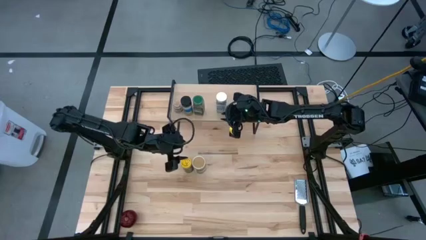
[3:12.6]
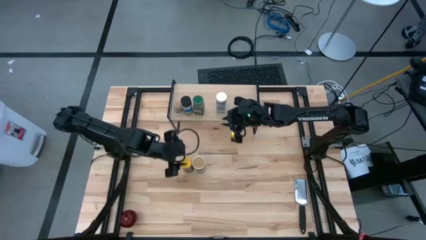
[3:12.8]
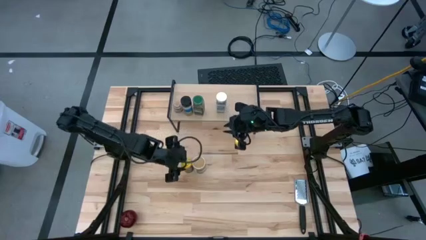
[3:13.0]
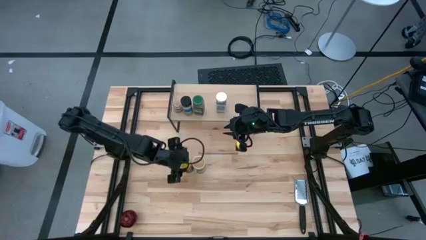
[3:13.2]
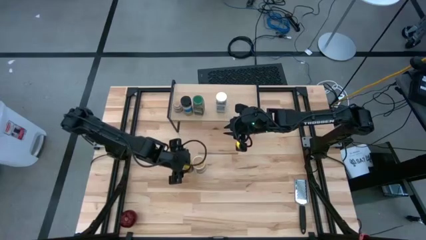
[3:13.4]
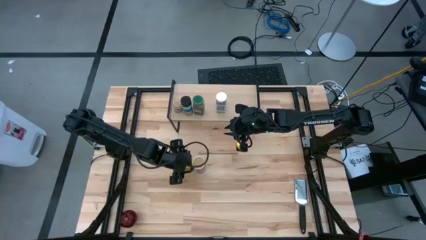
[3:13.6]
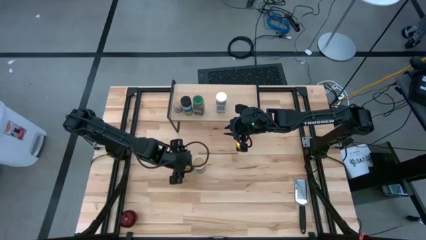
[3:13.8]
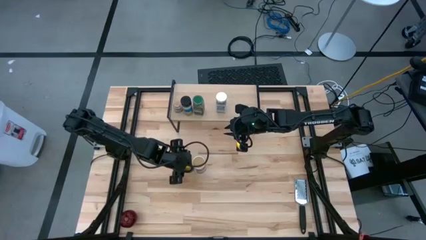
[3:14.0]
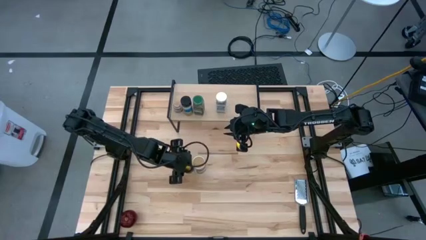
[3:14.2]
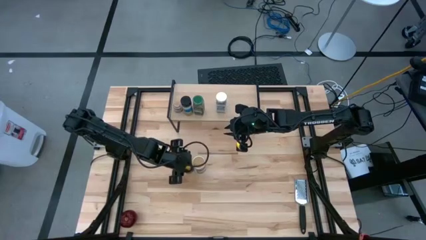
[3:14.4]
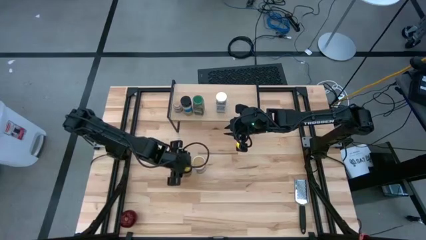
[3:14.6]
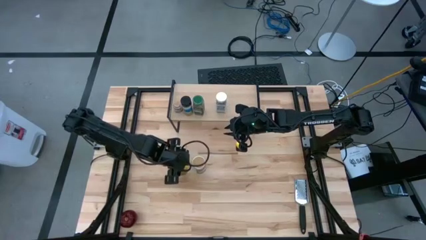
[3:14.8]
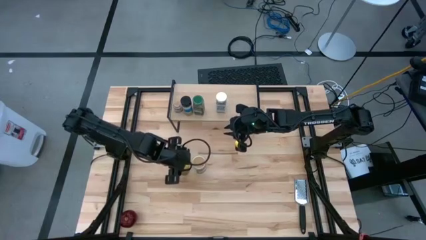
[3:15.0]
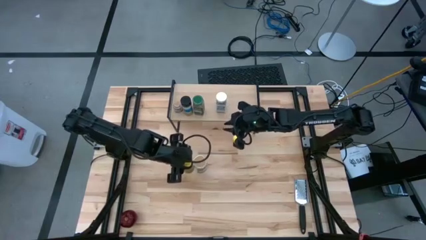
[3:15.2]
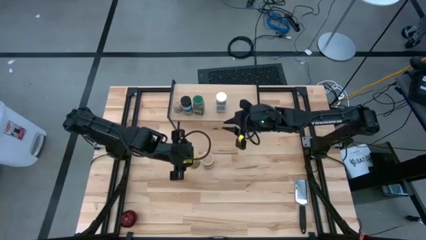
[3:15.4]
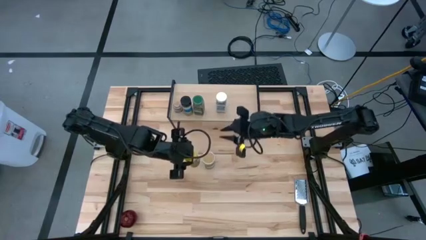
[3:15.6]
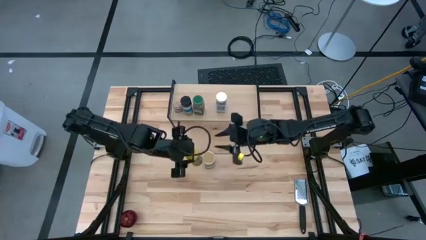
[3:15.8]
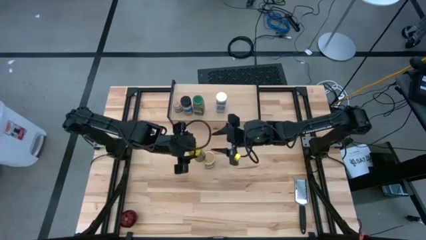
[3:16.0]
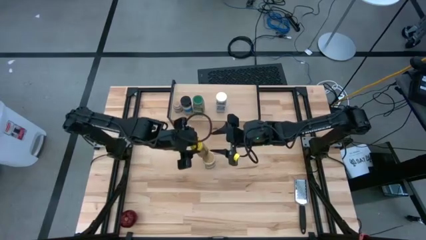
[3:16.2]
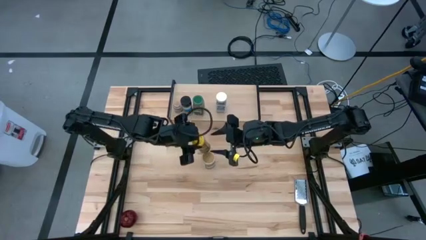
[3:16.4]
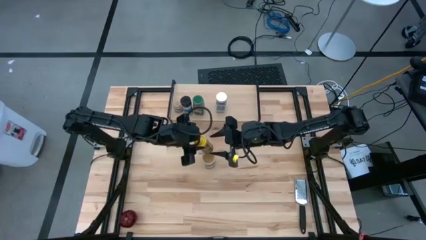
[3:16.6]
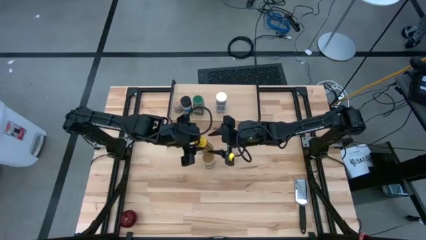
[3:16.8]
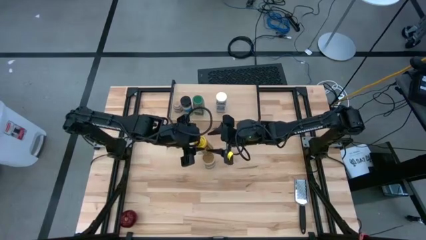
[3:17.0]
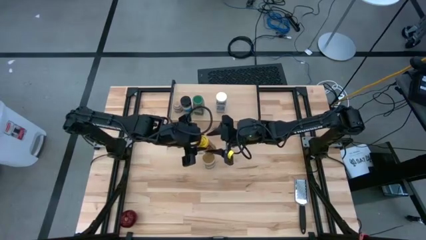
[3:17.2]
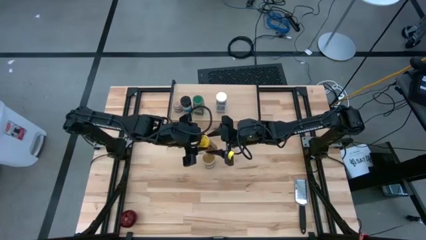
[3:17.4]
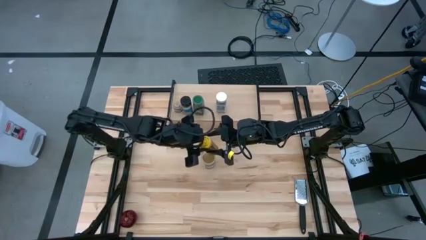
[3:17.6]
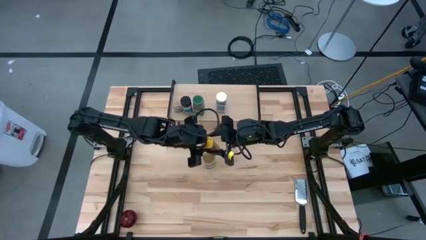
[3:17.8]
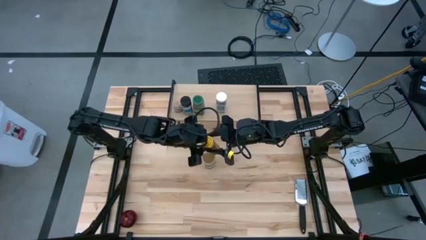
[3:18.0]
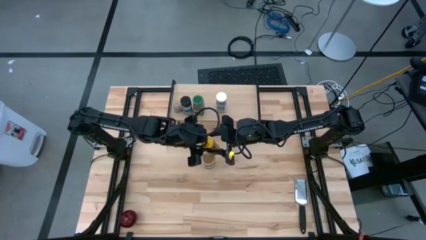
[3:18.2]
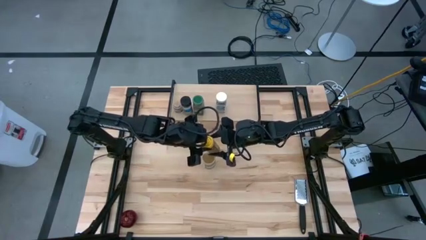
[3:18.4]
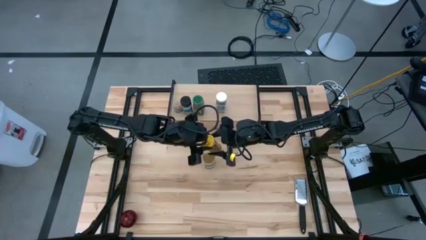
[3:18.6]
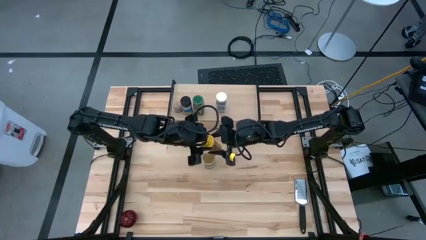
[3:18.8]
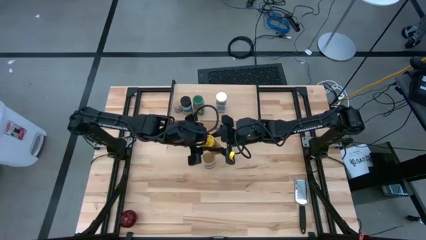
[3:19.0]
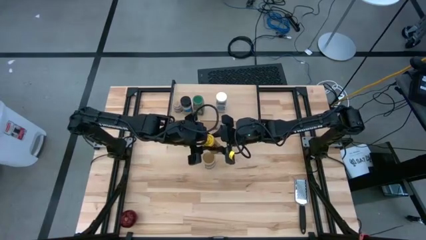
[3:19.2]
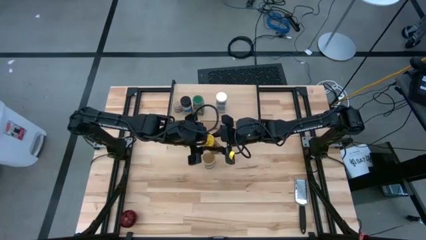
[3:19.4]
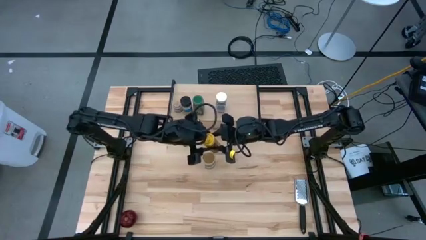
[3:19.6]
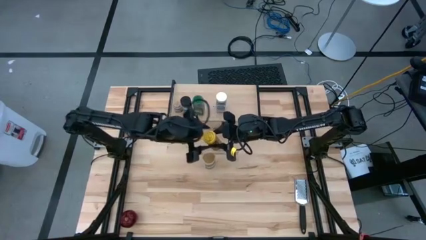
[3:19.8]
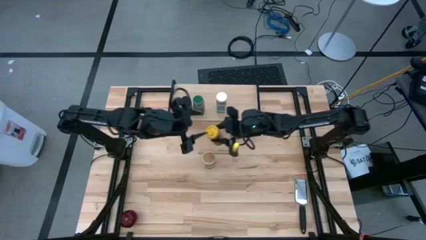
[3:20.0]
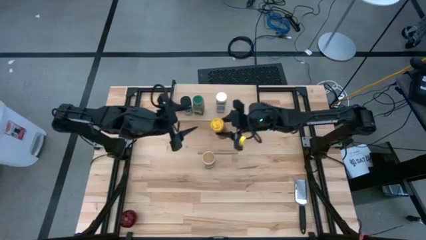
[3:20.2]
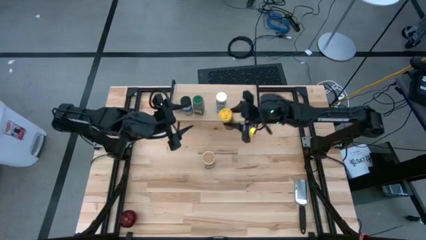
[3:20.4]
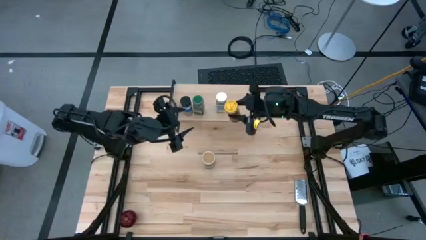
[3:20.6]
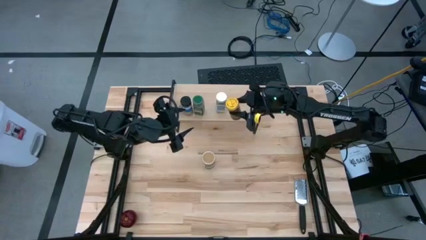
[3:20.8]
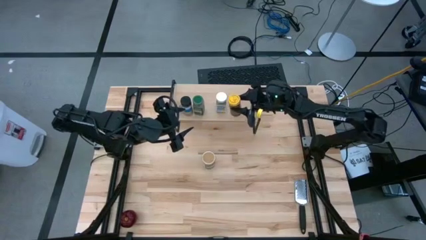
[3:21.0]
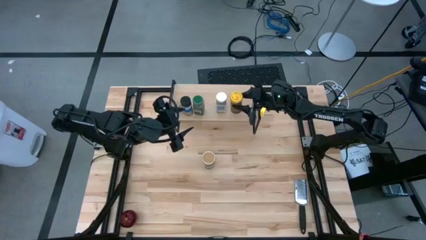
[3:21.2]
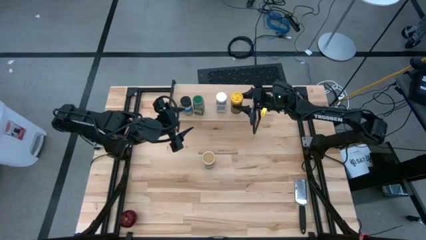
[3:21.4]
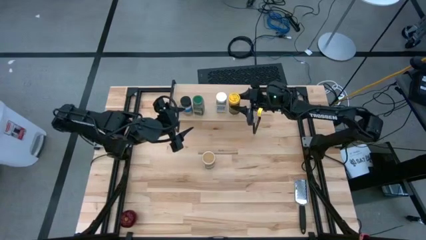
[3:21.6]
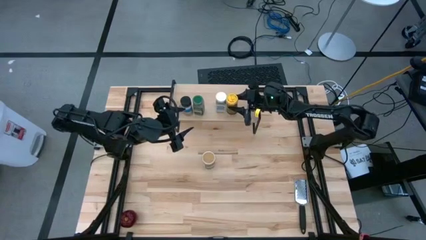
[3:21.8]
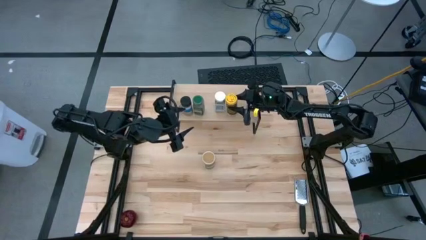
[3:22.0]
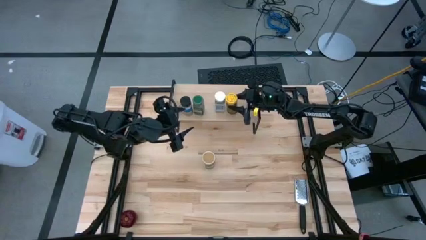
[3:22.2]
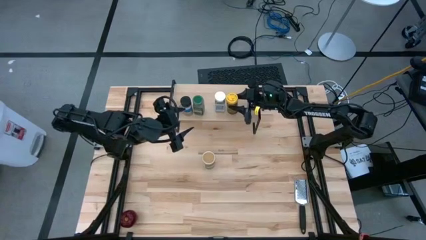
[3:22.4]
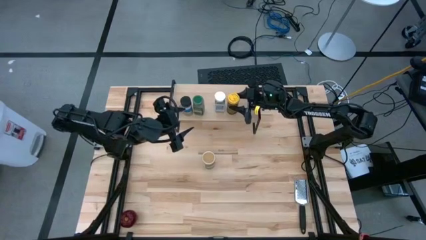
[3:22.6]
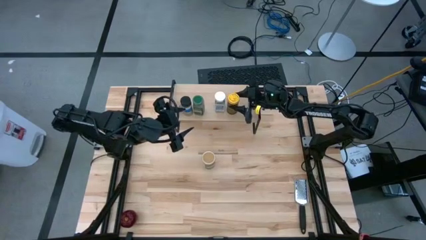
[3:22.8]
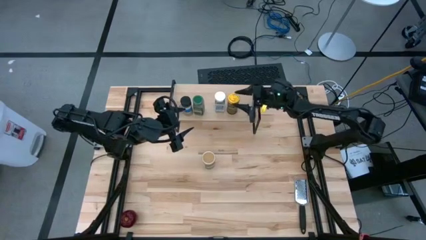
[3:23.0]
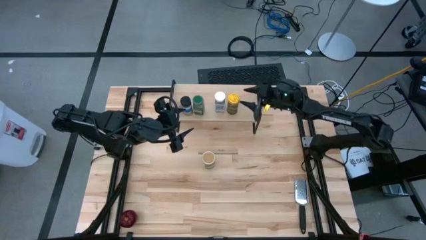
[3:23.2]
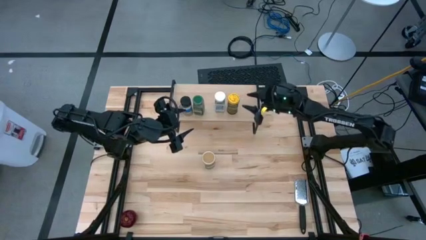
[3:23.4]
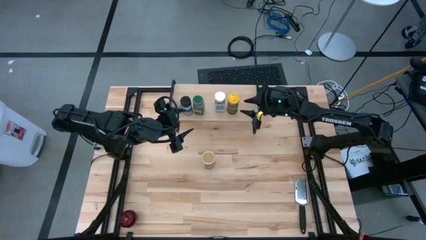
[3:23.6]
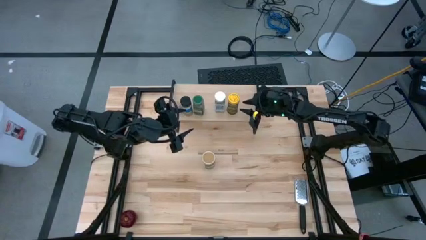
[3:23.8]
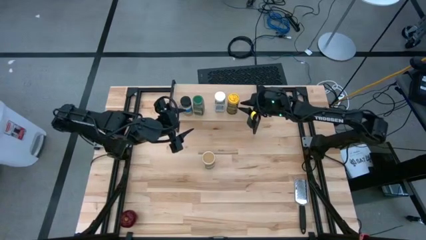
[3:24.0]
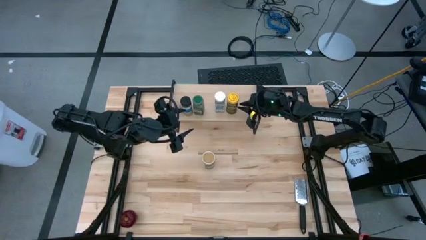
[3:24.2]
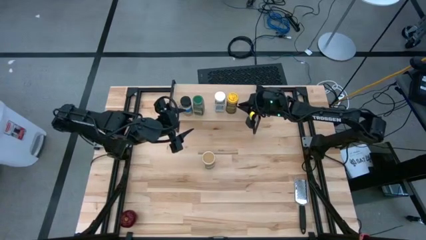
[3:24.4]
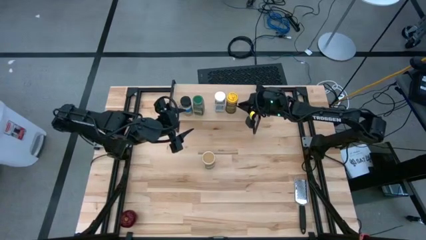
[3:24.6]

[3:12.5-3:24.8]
Task: Shelf spices
Put the yellow seasoning bottle can on the shelf
